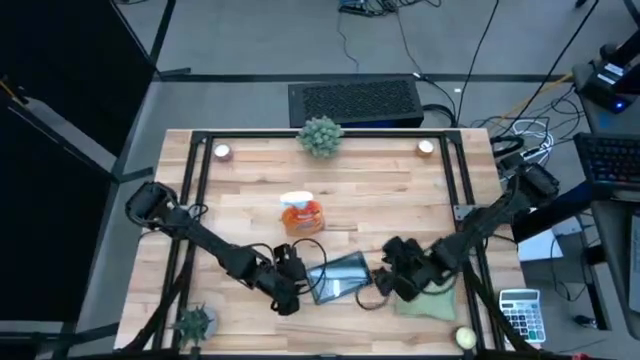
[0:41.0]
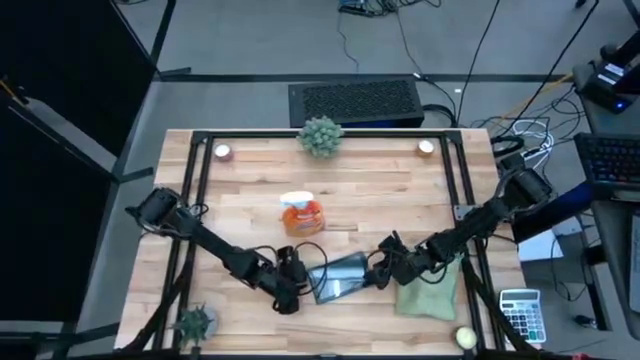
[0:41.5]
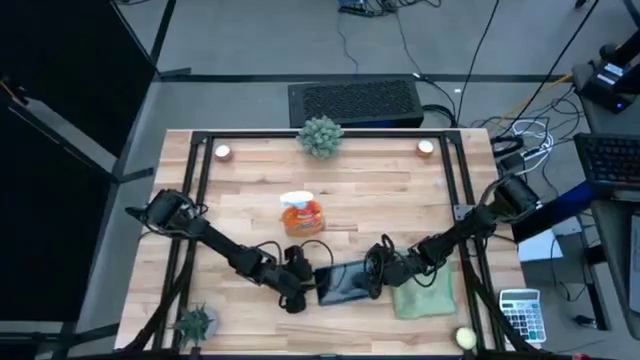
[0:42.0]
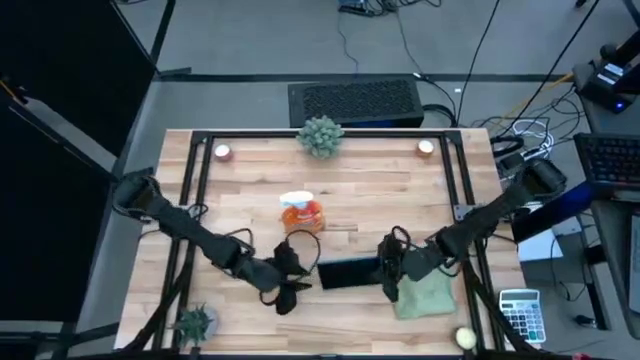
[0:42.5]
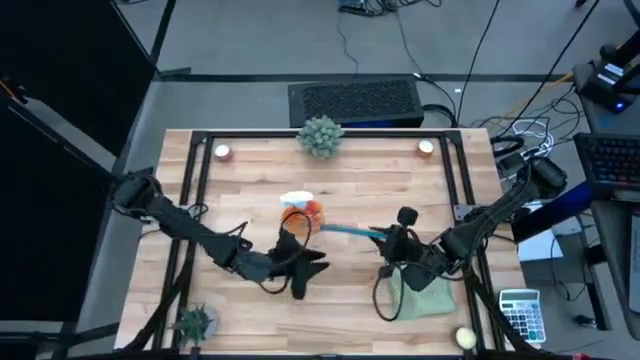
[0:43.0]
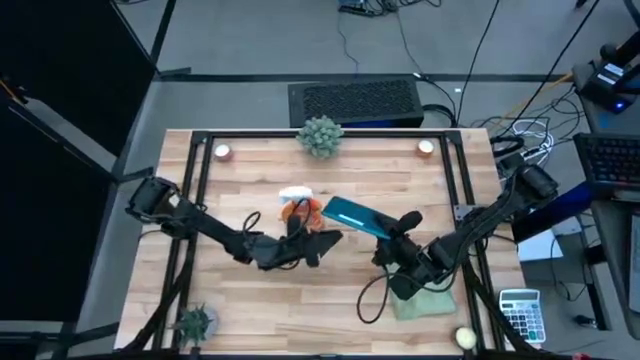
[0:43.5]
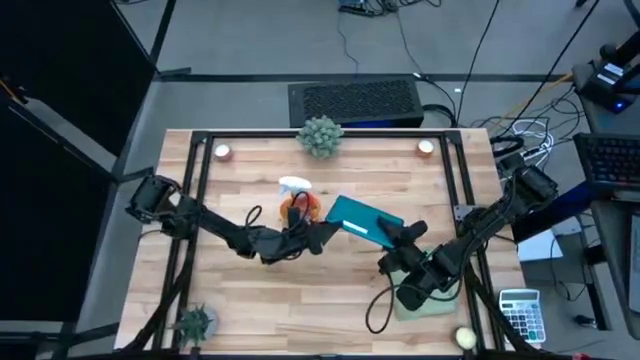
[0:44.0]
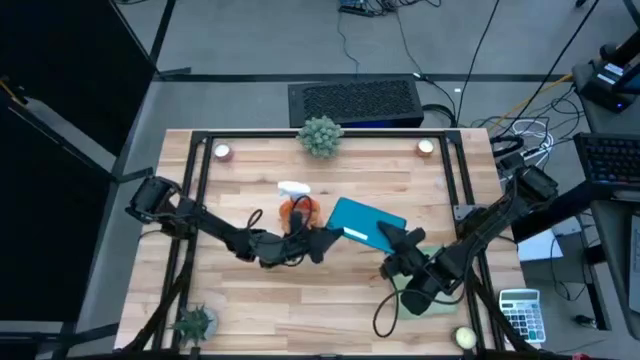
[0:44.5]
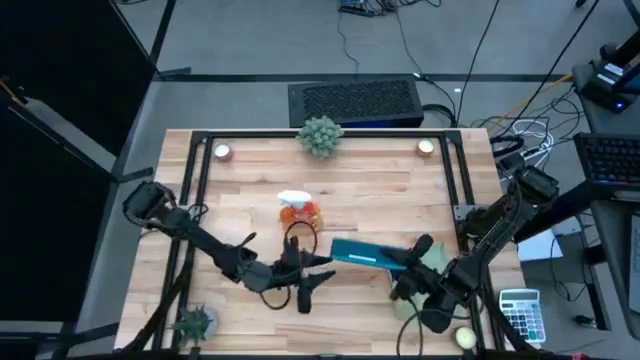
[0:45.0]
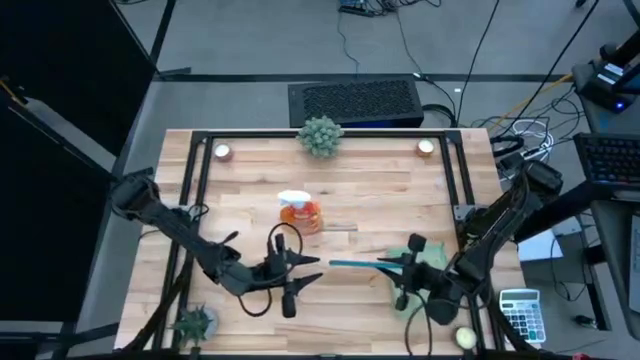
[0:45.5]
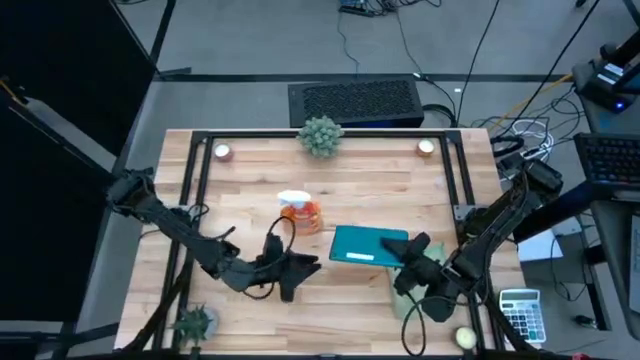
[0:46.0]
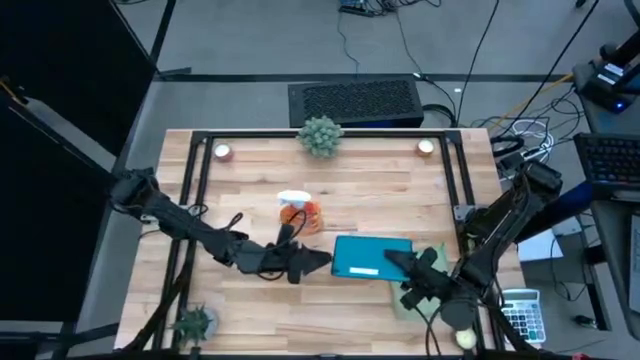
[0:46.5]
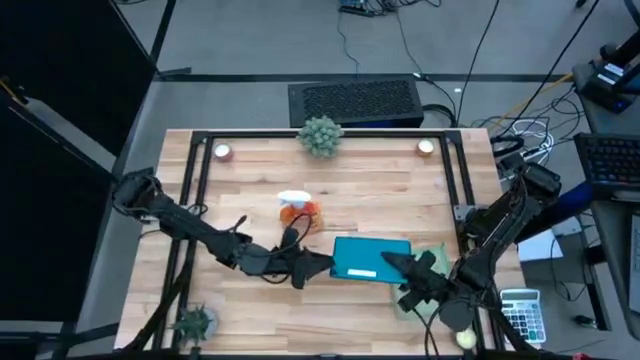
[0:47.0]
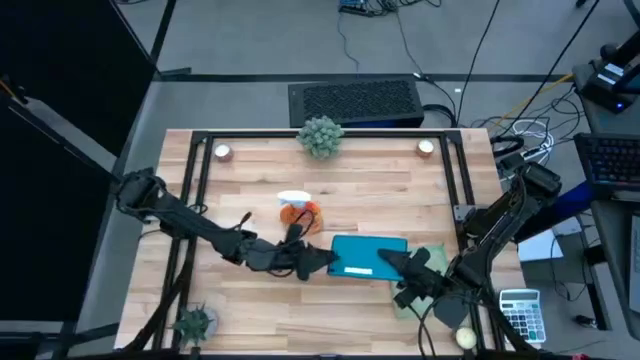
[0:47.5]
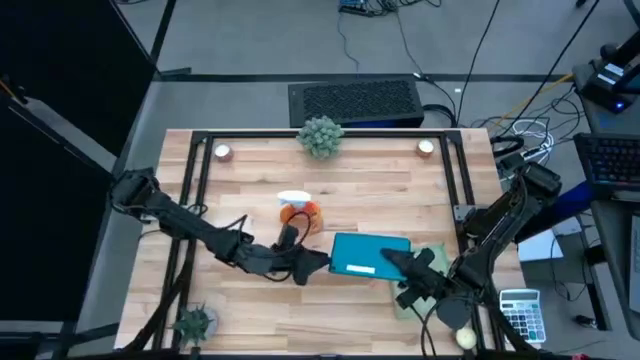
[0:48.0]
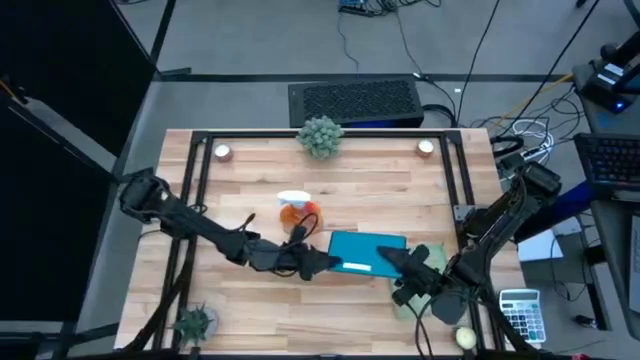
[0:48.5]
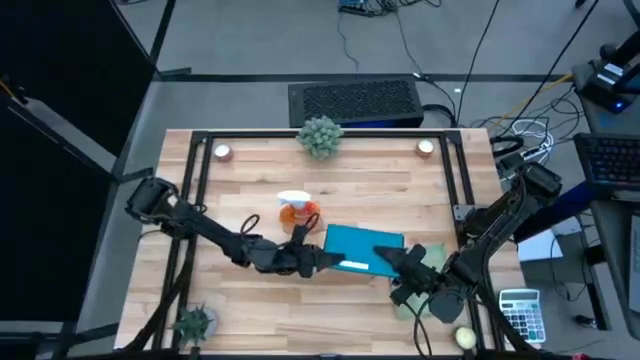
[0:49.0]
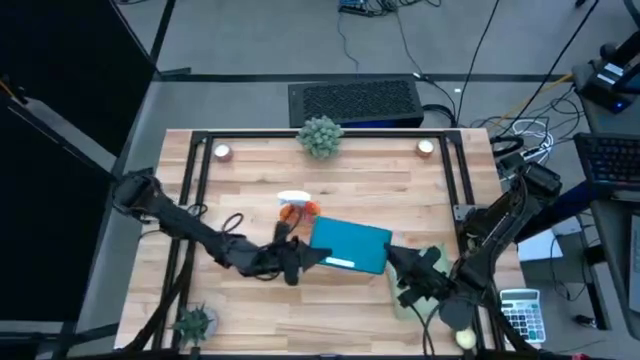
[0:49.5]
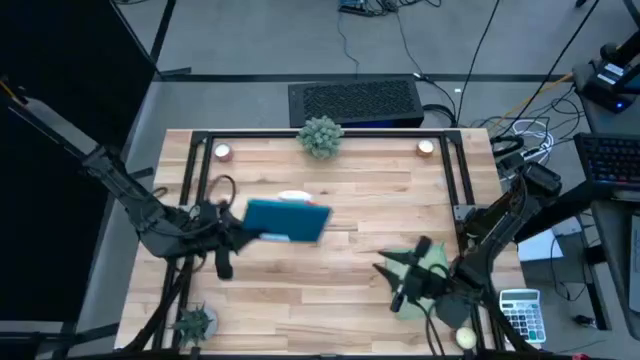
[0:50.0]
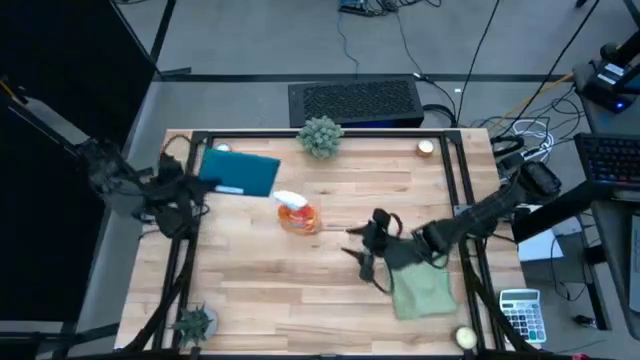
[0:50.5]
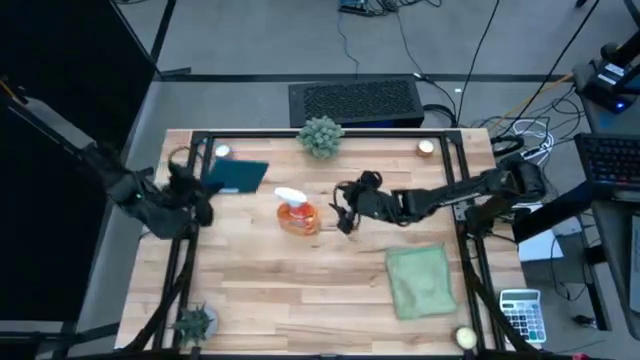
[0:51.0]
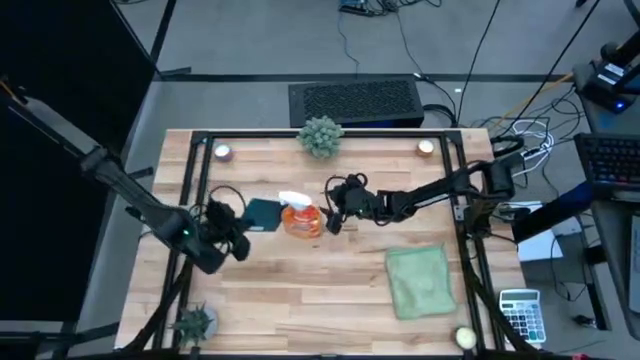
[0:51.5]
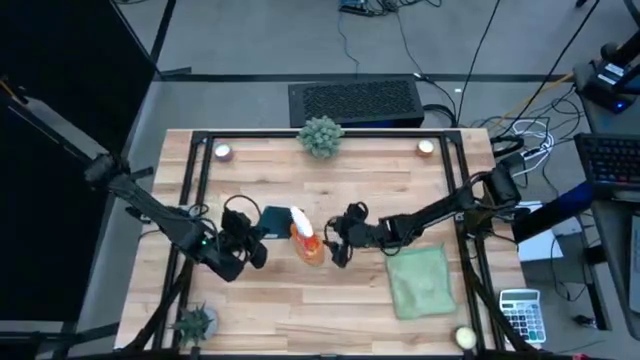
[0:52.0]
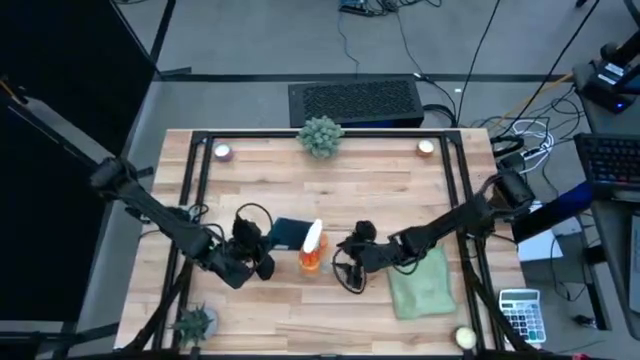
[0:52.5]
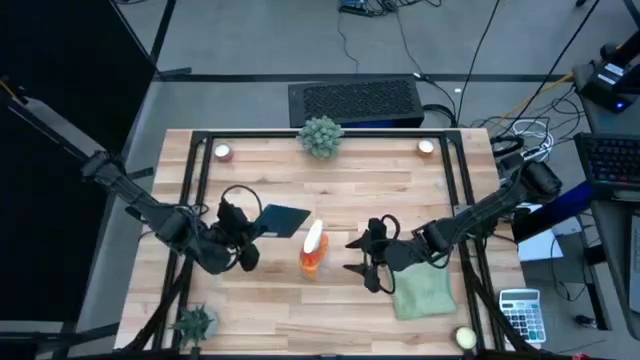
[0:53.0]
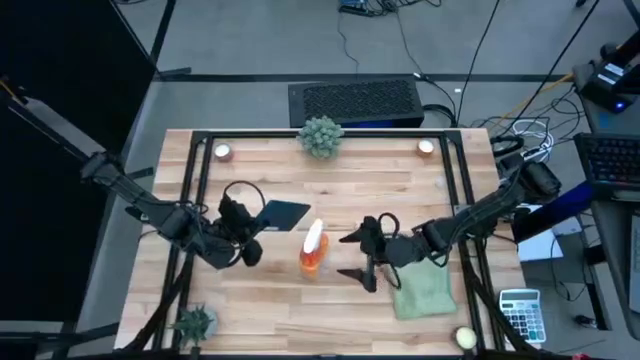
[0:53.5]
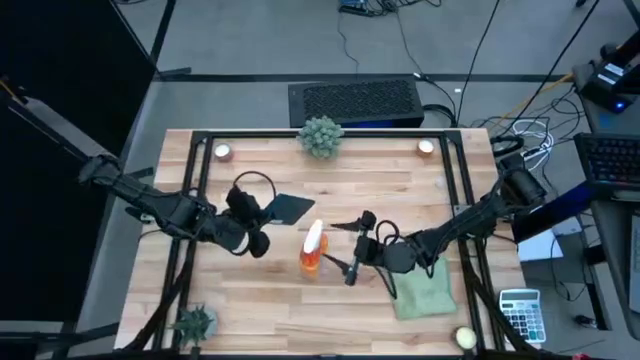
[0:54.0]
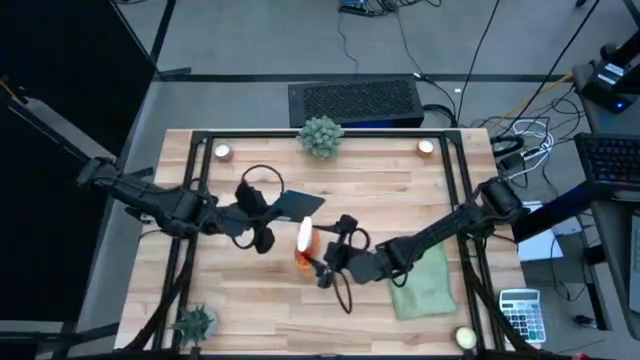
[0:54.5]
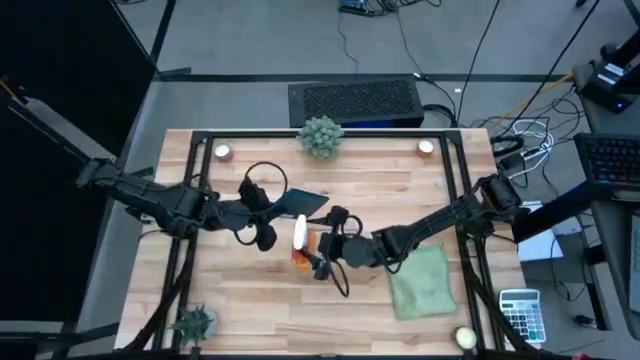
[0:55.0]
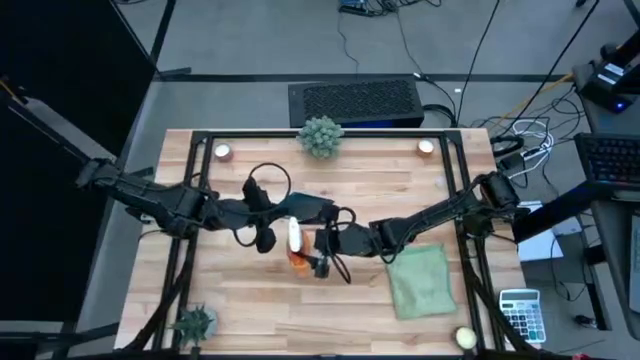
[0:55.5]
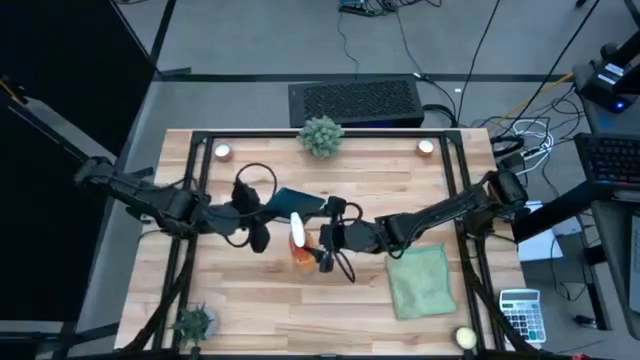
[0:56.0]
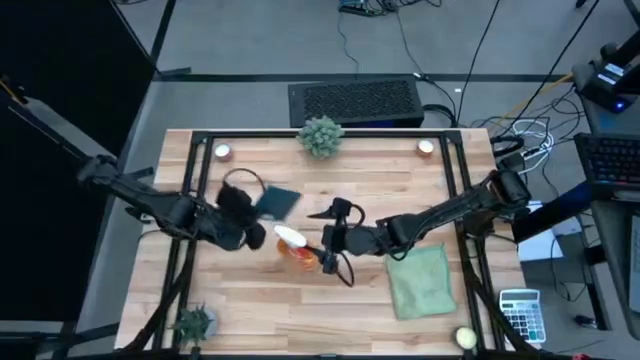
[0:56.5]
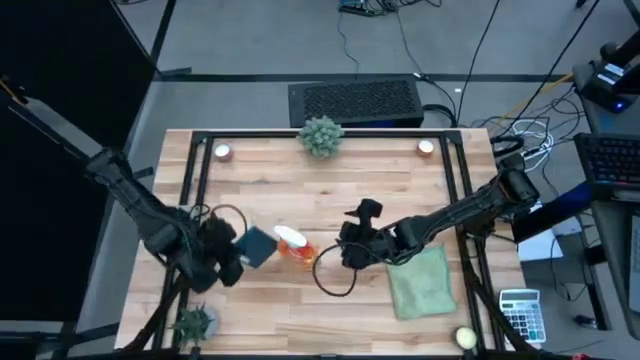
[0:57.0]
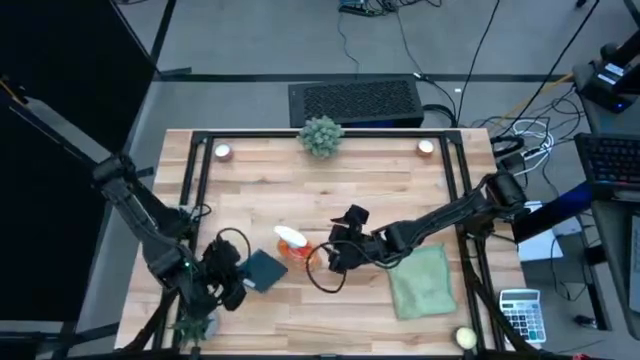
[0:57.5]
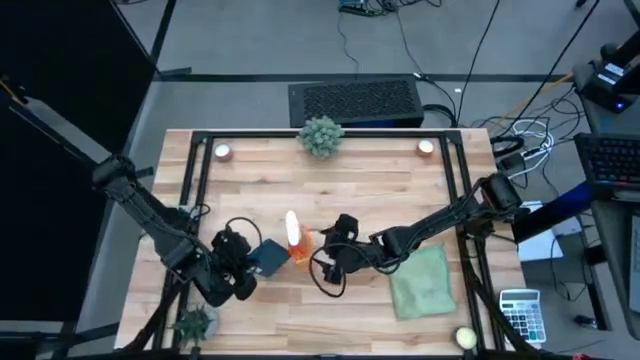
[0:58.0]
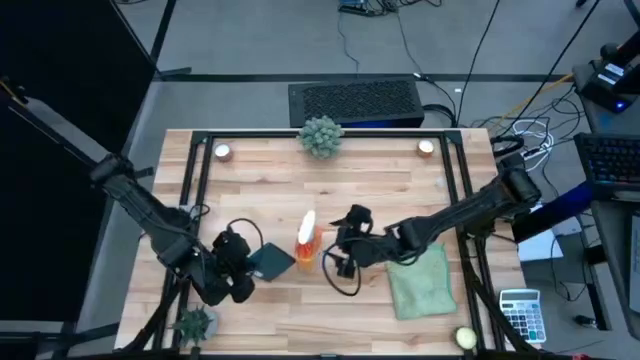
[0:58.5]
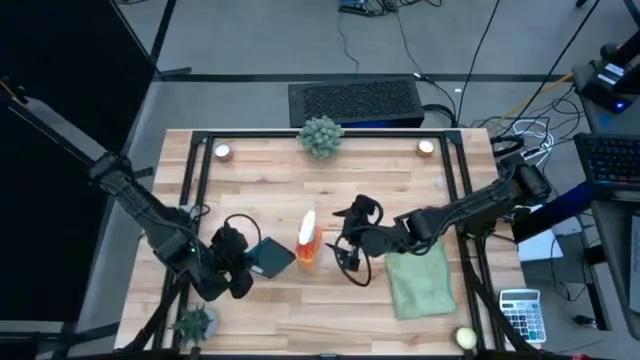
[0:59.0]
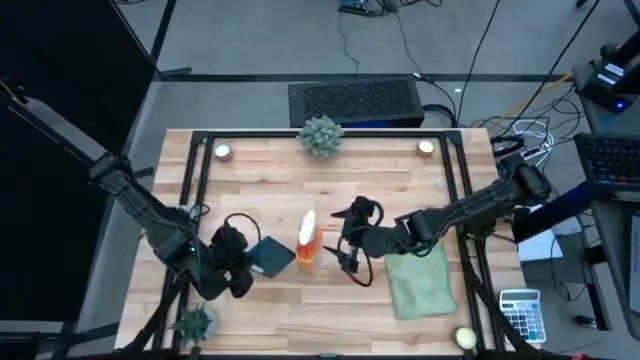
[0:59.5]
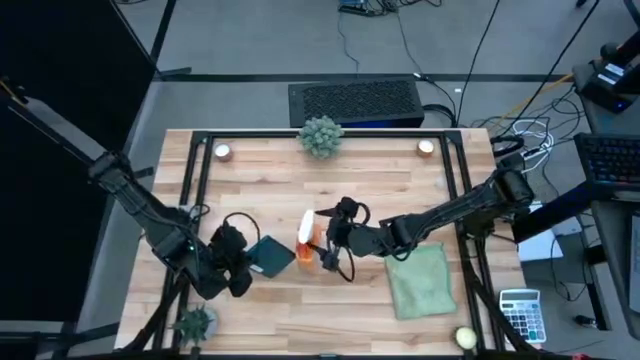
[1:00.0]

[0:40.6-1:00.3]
Task: Apply microfiber cloth
Spray the back of the cellphone with a spray bottle

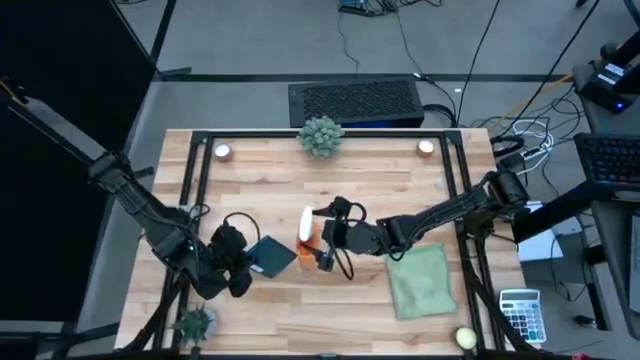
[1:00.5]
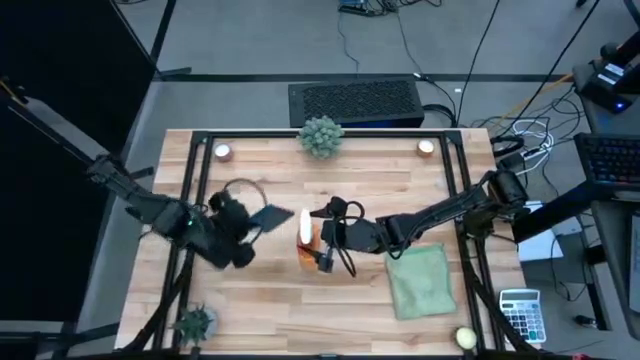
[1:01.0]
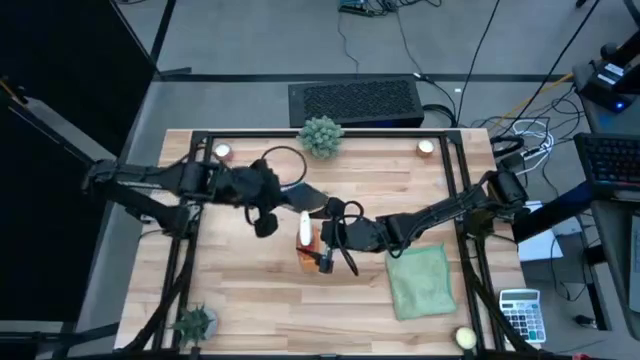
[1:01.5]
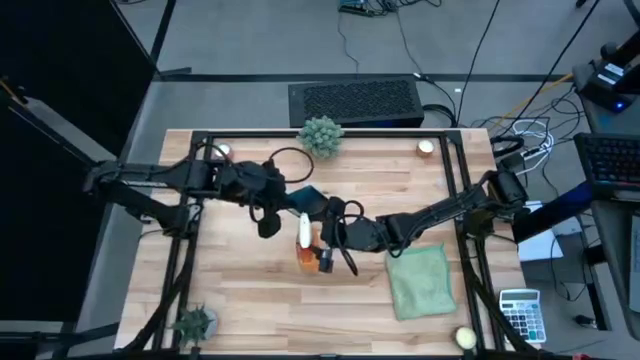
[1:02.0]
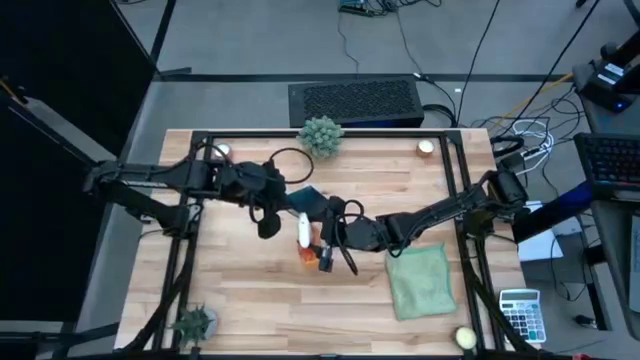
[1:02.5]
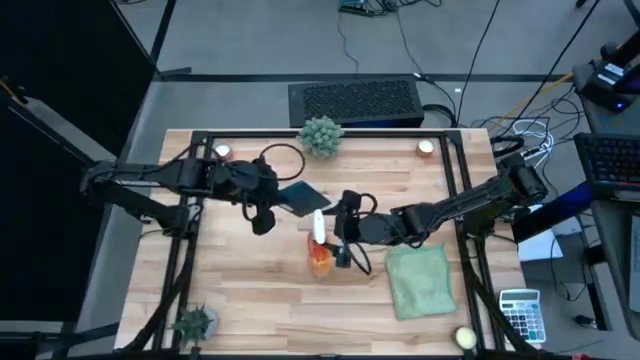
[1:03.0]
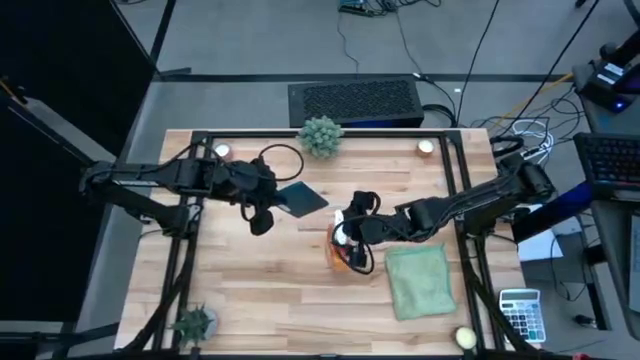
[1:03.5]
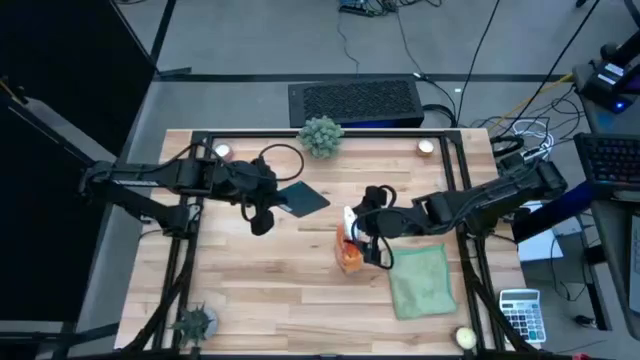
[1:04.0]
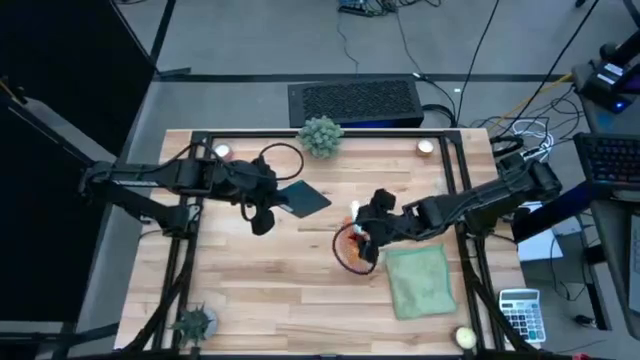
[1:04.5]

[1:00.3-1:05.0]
Spray the back of the cellphone with a spray bottle
